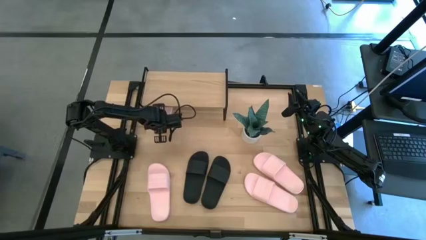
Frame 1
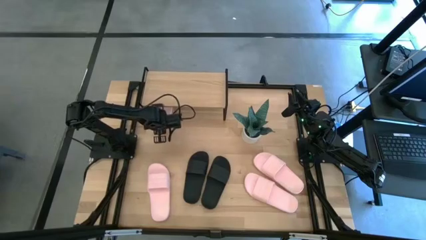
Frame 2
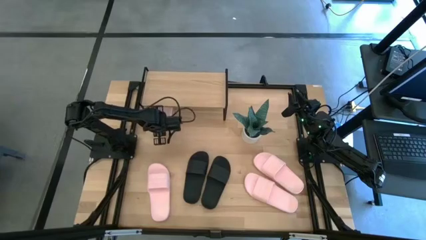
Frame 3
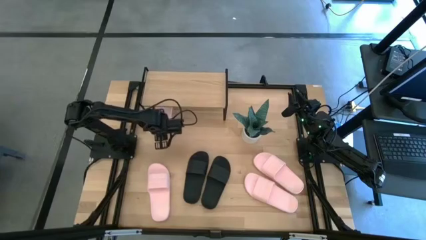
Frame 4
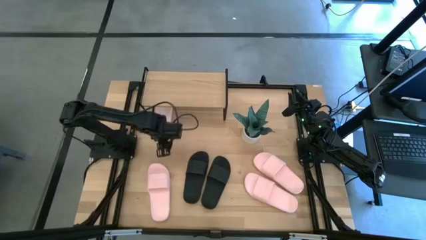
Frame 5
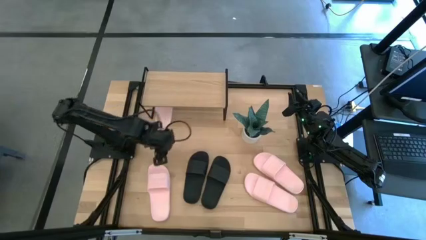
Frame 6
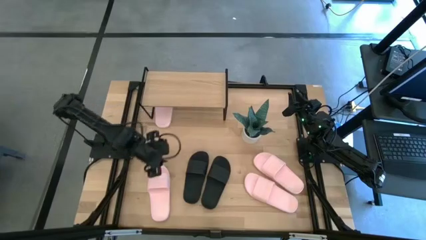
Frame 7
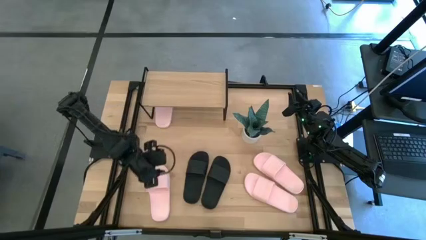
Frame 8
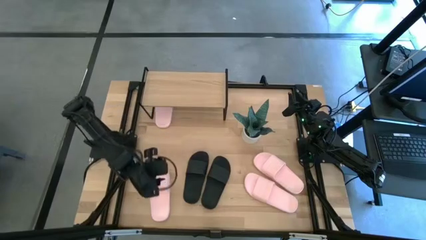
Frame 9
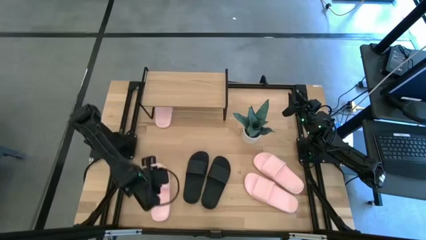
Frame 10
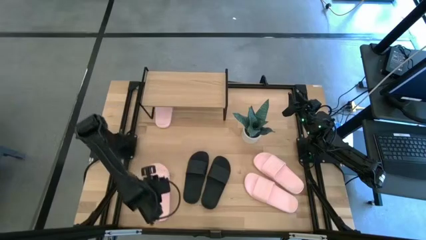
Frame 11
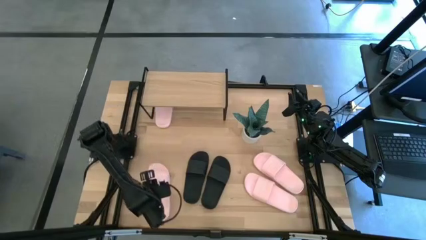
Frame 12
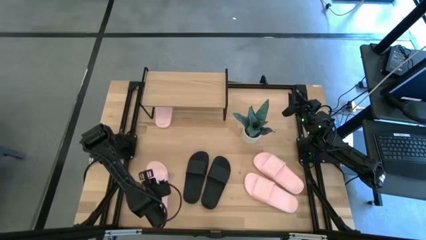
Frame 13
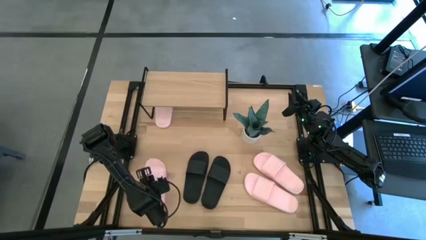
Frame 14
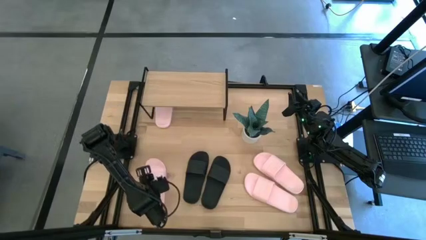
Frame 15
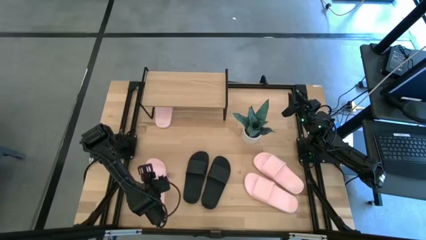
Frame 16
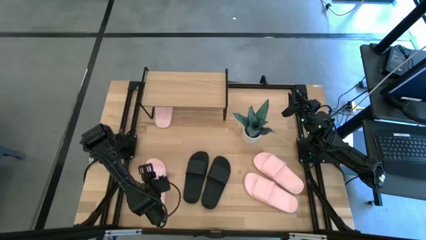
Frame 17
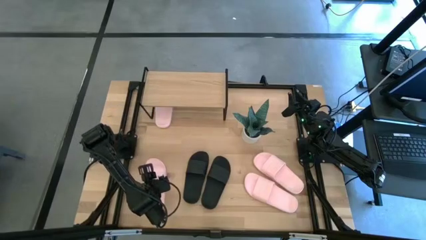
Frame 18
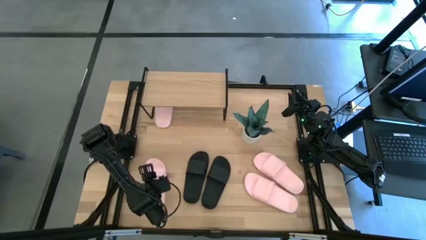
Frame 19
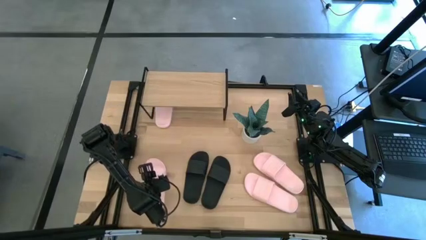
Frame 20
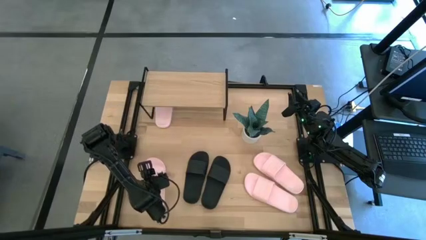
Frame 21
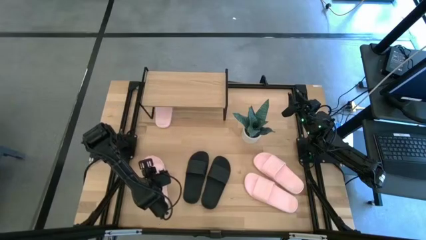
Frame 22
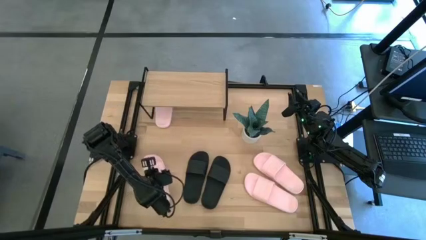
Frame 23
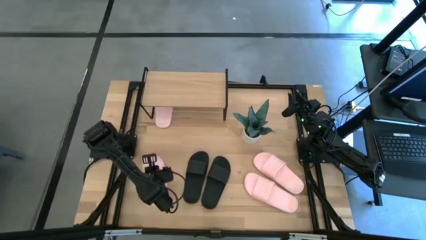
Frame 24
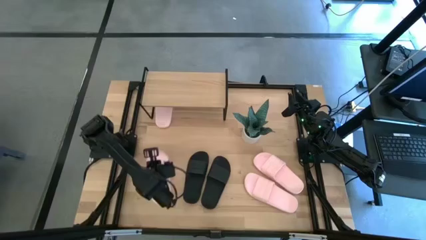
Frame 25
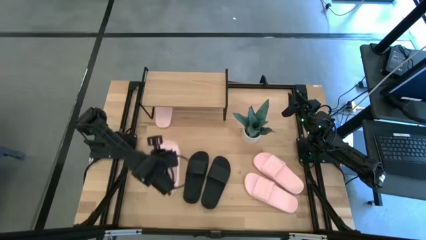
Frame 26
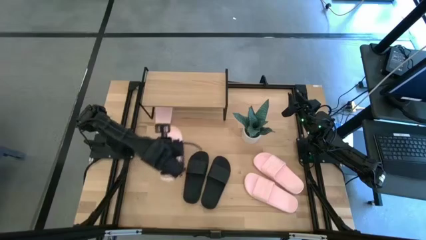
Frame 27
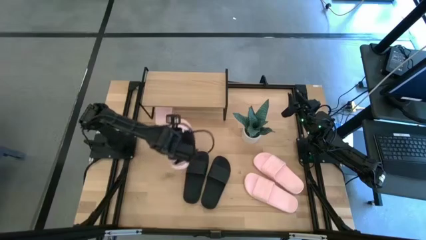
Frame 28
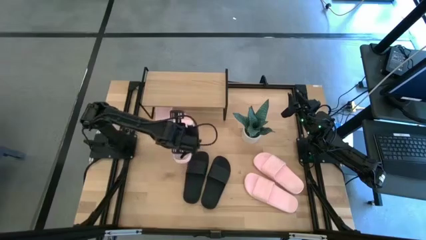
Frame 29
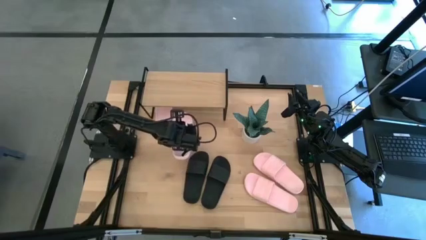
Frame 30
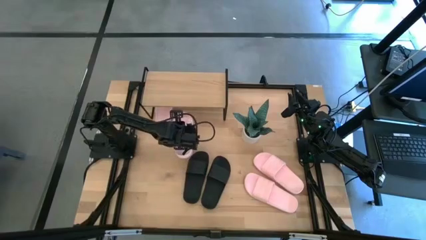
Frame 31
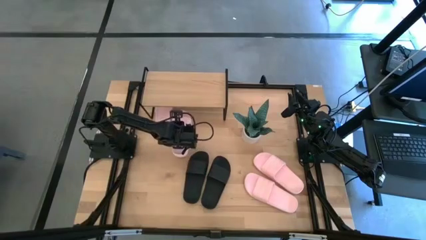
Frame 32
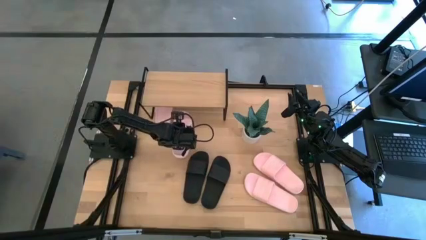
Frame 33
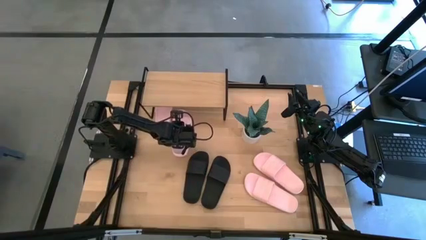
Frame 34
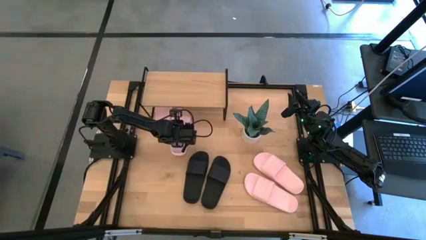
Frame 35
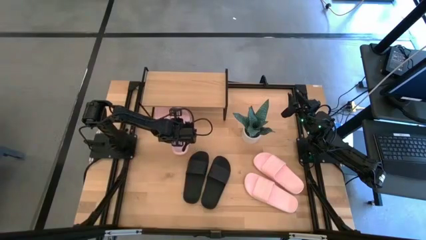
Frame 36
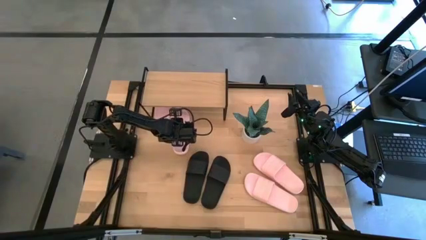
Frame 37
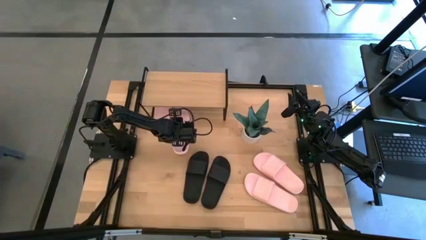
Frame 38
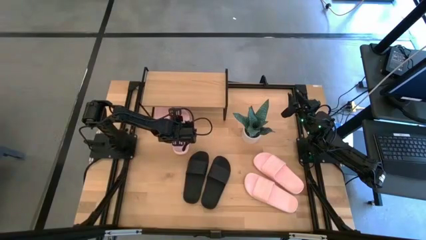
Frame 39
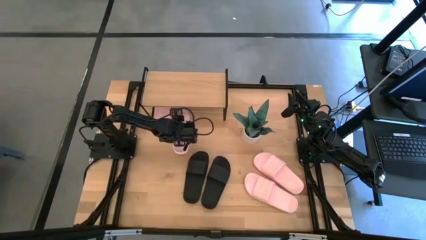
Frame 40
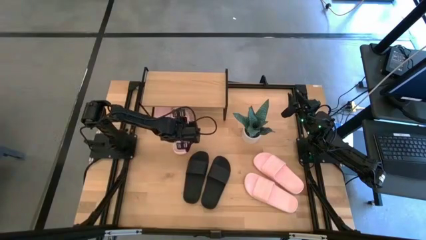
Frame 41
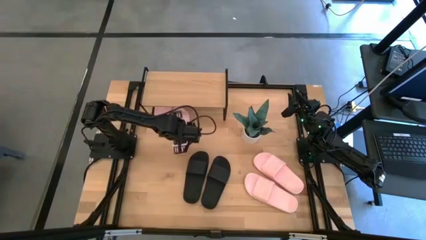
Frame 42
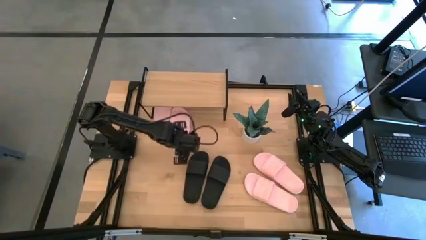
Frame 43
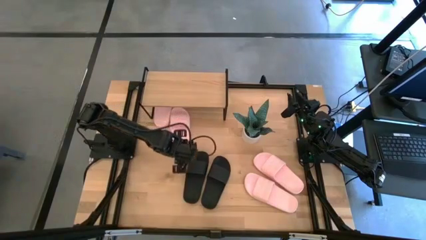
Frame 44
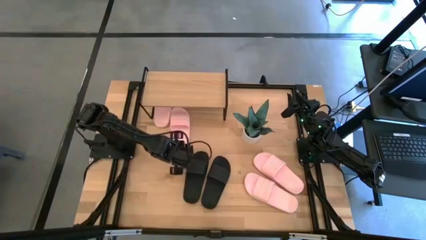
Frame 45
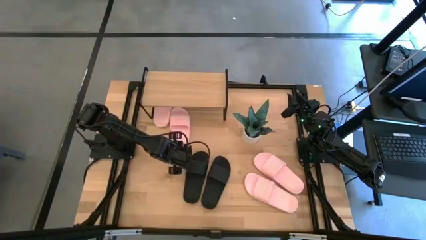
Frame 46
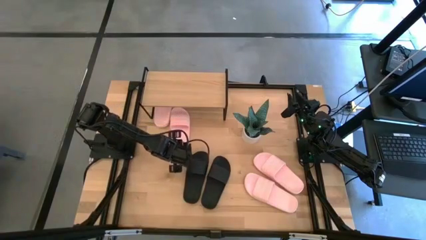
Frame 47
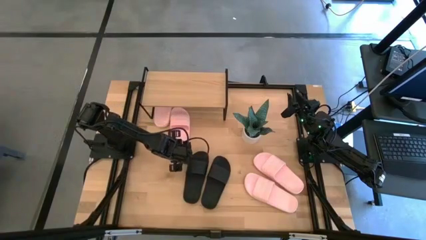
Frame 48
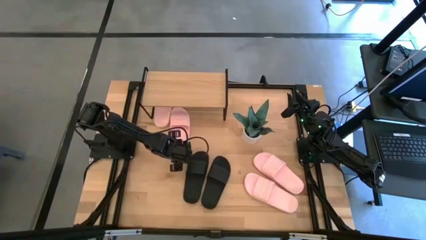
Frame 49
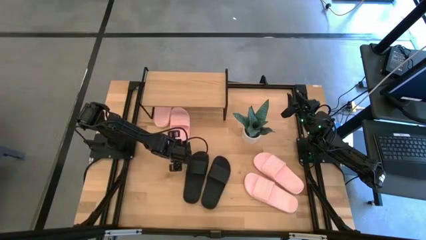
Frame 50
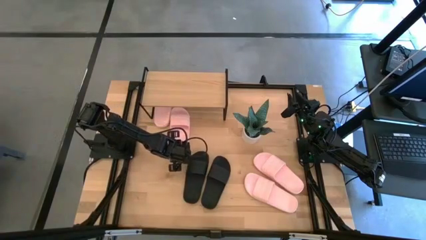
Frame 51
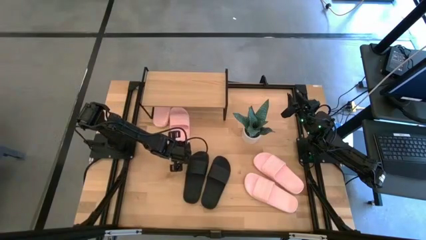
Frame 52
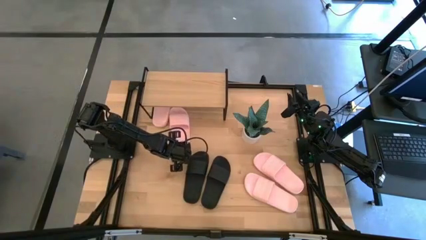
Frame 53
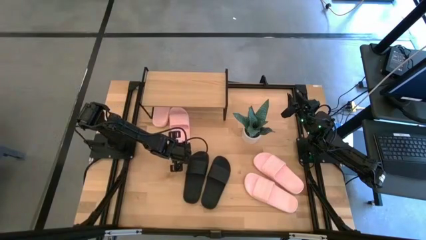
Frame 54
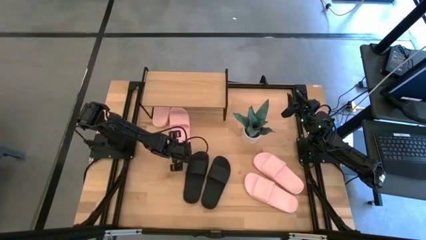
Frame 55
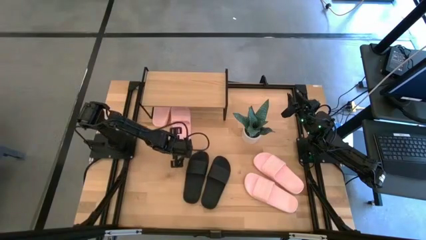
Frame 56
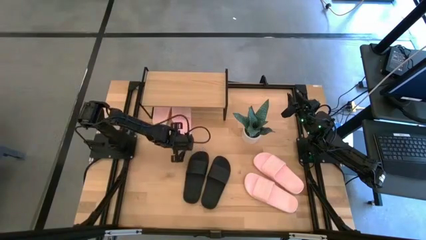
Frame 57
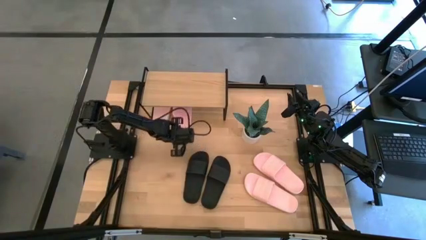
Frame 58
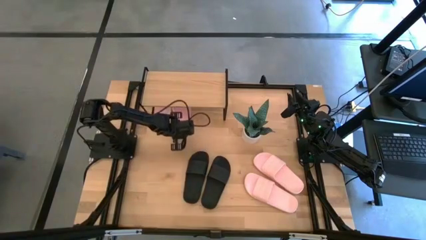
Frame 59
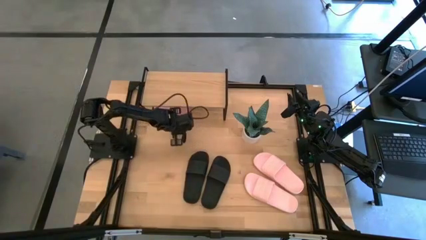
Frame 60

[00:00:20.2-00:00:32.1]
Task: Pick and place slides into the shelf
Put the pink slipper under the shelf

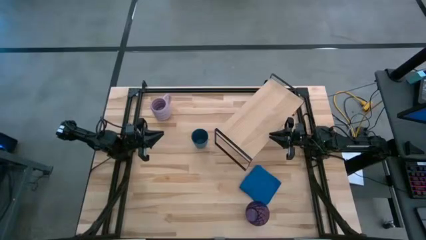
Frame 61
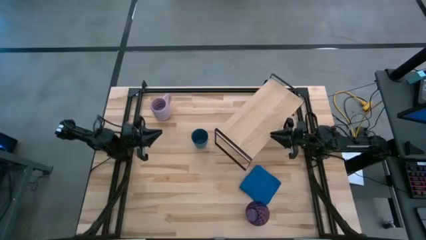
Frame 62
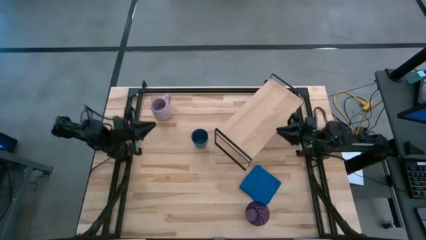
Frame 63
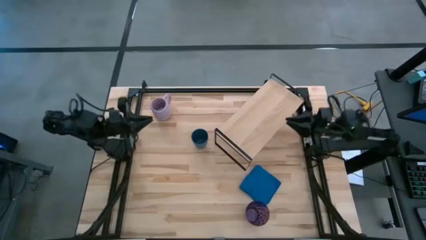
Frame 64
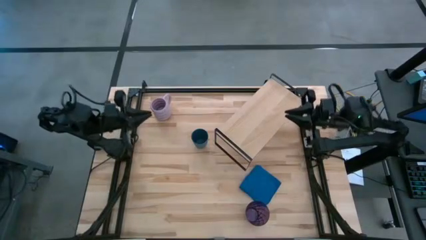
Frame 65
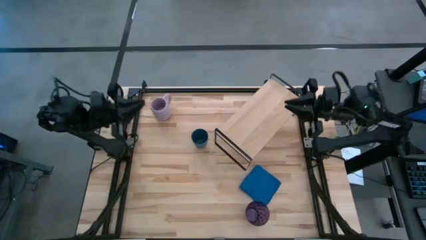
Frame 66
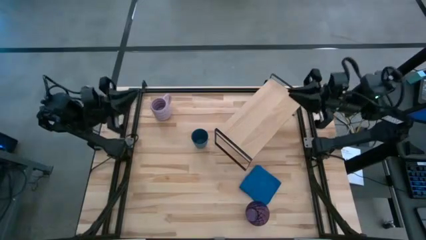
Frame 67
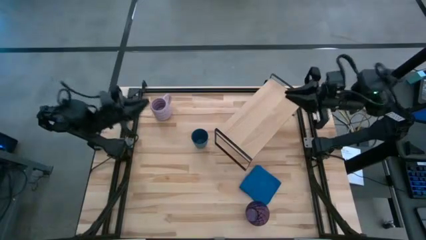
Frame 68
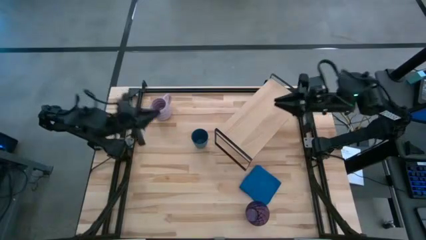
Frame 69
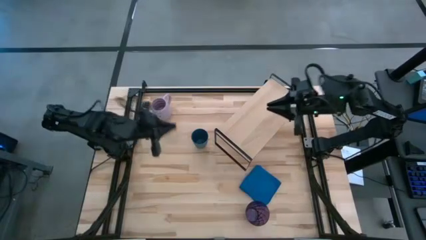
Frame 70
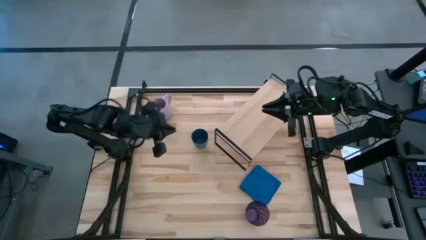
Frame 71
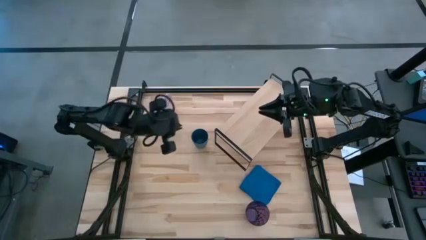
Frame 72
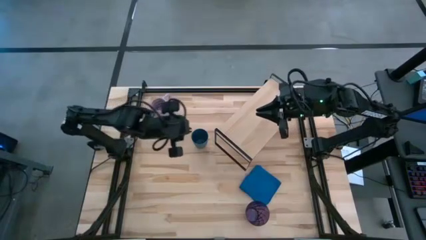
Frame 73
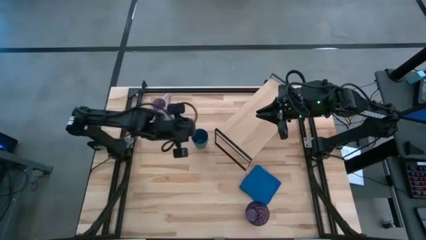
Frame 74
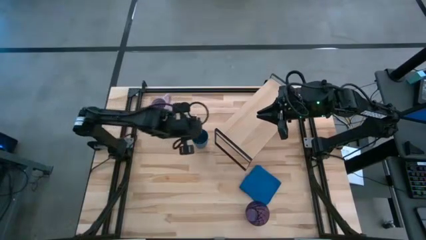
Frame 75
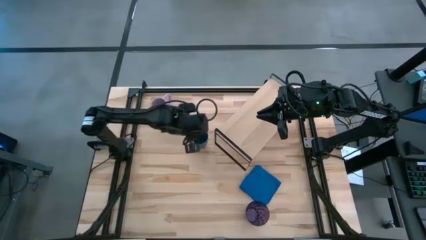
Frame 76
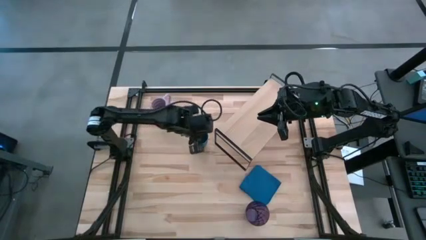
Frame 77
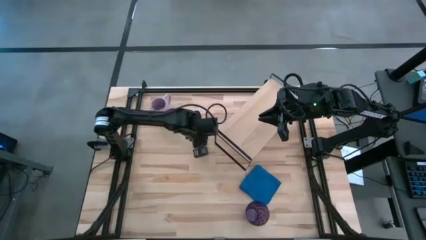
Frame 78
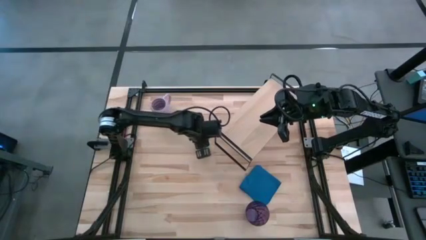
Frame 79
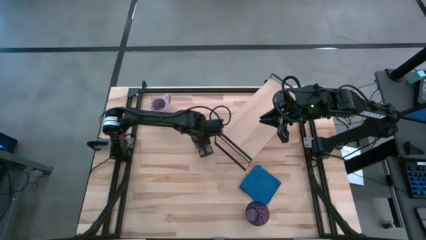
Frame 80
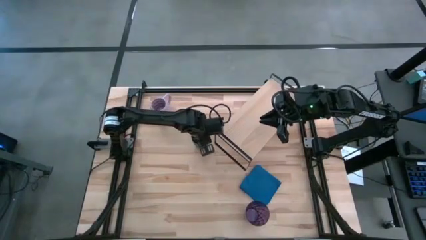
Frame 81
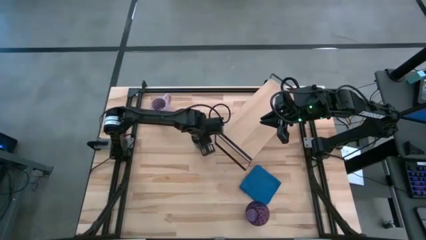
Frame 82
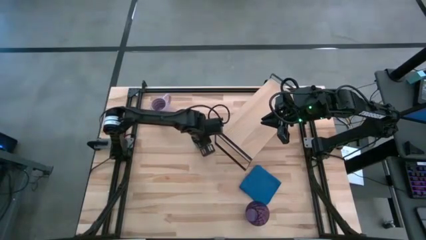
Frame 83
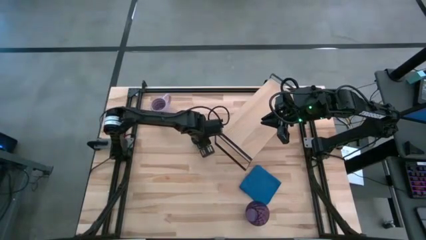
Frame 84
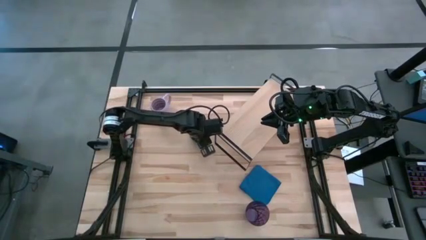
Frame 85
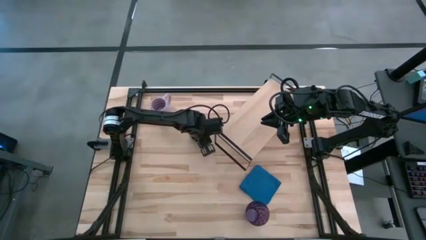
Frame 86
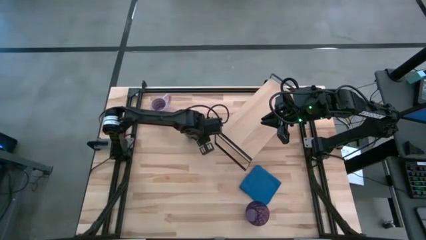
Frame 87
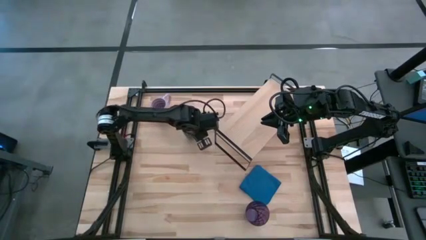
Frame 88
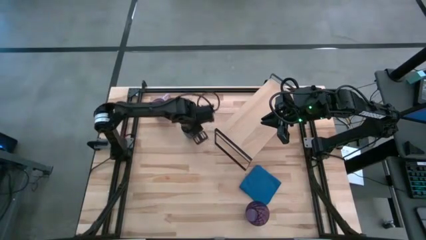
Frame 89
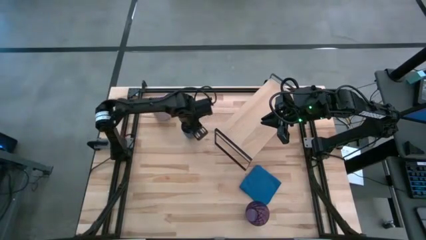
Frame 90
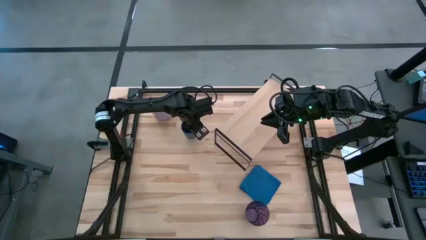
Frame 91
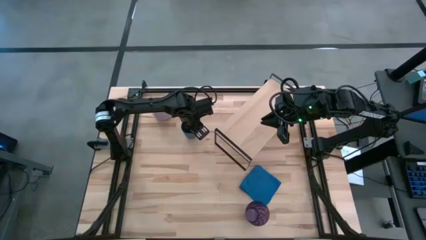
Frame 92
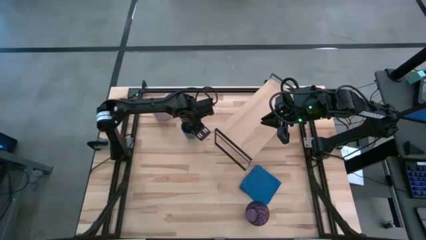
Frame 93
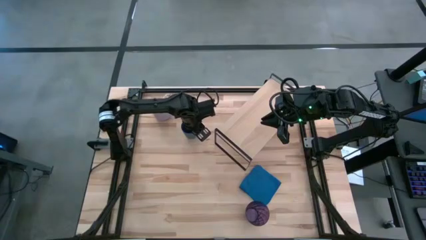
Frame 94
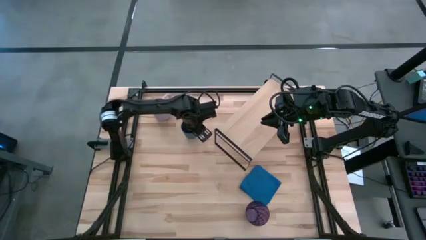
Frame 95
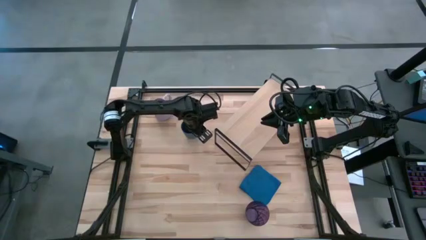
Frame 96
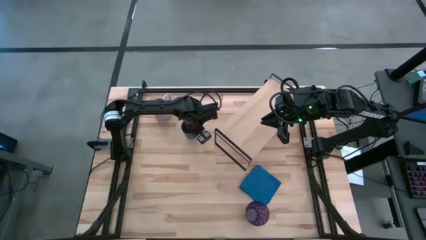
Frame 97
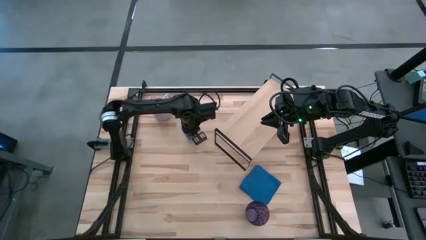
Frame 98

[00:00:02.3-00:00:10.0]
Task: Stack small to large cups/mugs on shelf
Put the blue cup on the shelf
